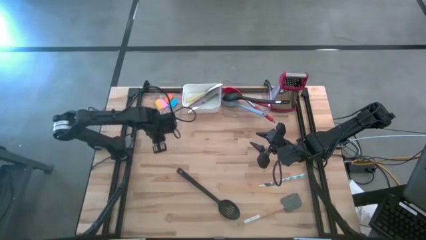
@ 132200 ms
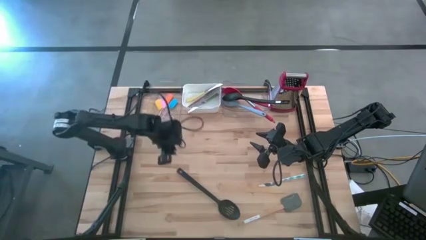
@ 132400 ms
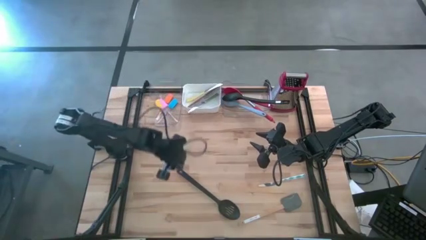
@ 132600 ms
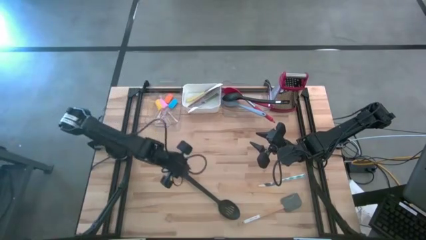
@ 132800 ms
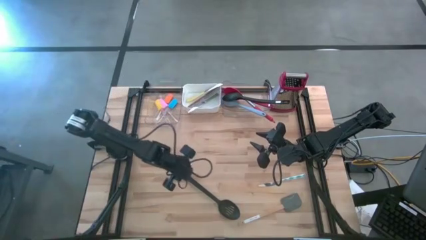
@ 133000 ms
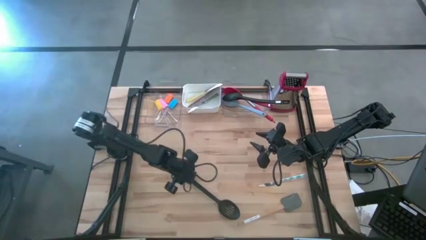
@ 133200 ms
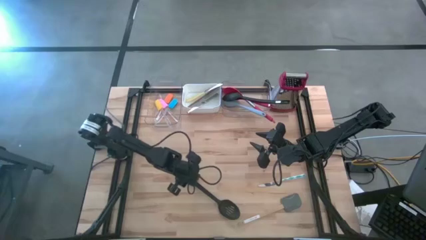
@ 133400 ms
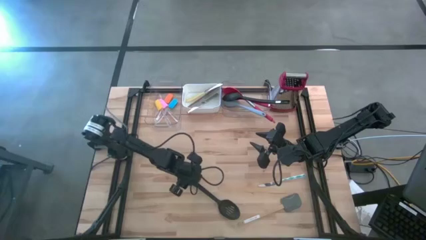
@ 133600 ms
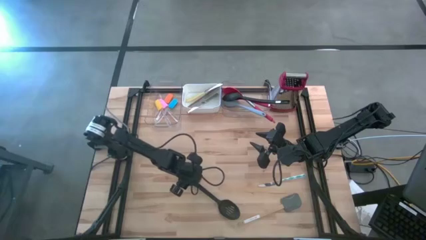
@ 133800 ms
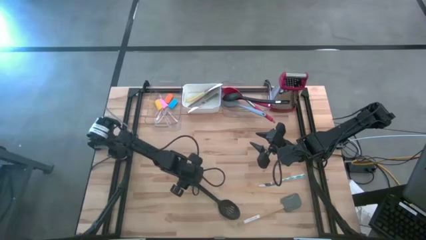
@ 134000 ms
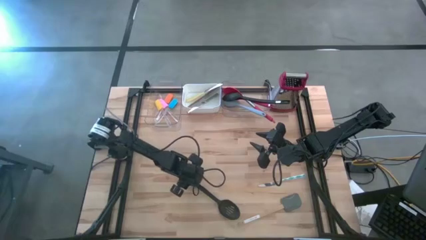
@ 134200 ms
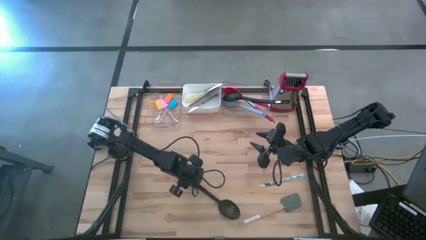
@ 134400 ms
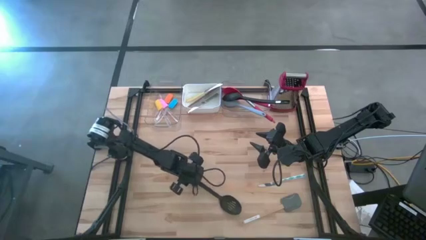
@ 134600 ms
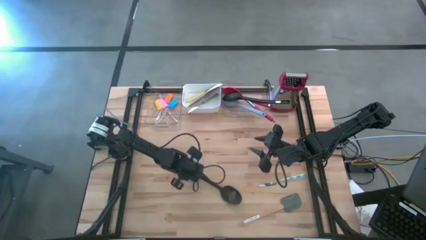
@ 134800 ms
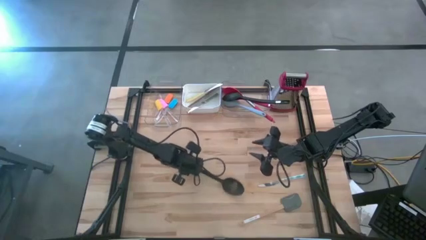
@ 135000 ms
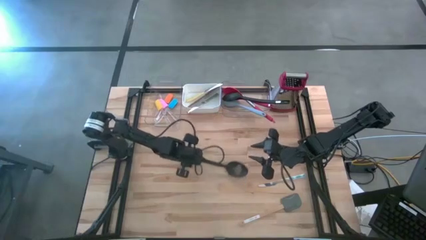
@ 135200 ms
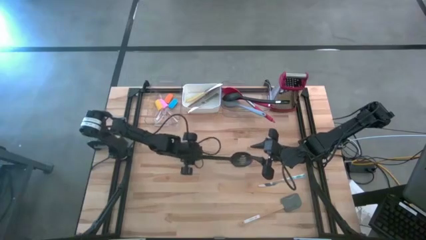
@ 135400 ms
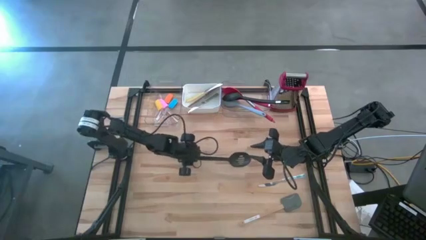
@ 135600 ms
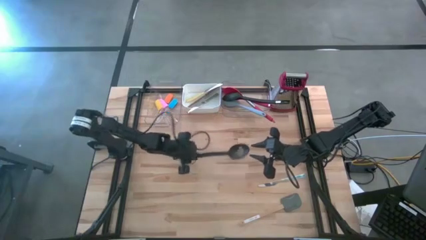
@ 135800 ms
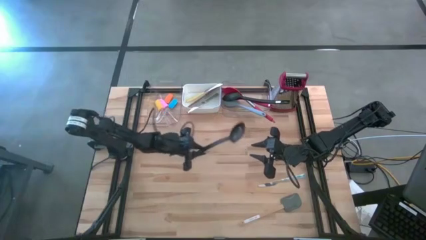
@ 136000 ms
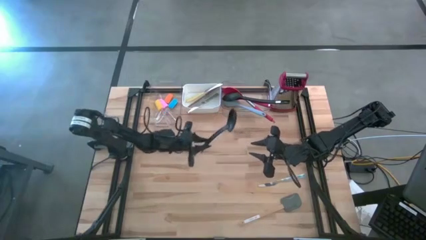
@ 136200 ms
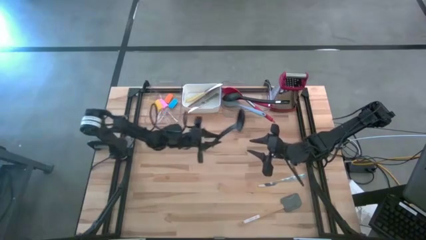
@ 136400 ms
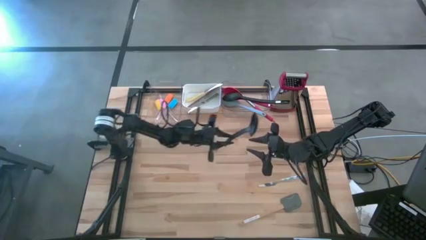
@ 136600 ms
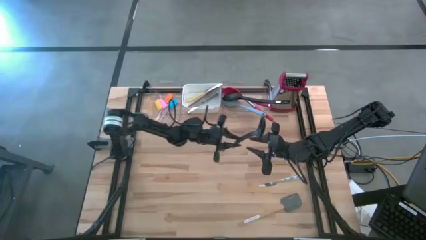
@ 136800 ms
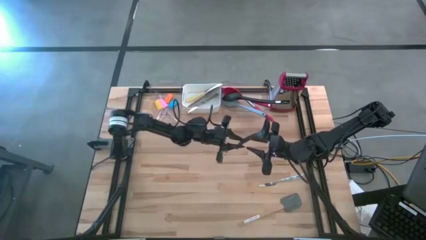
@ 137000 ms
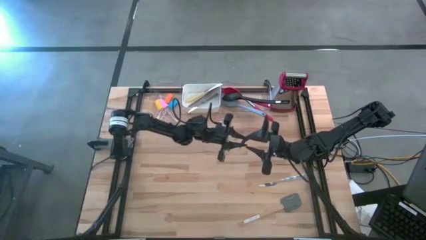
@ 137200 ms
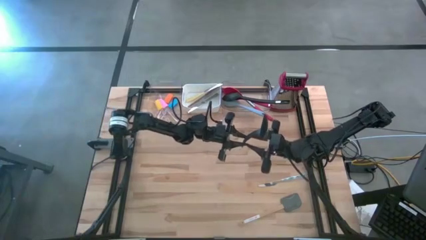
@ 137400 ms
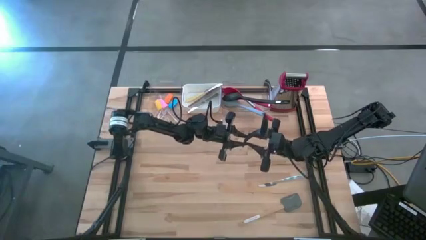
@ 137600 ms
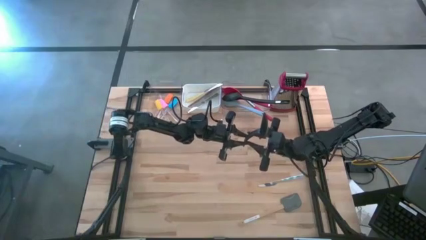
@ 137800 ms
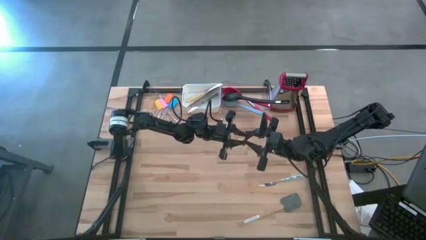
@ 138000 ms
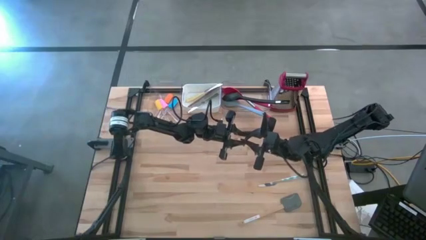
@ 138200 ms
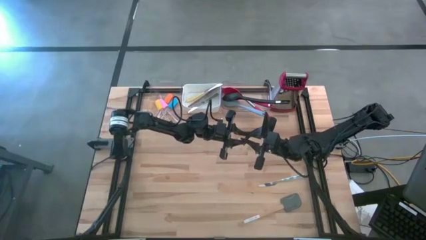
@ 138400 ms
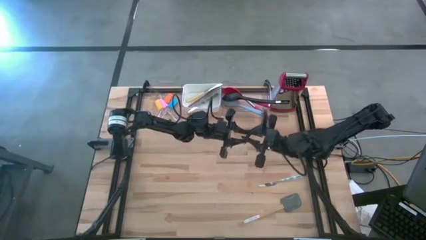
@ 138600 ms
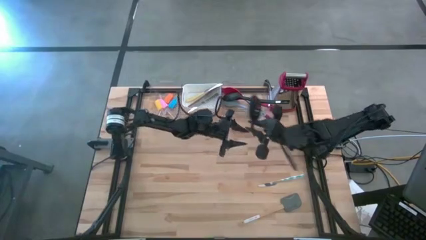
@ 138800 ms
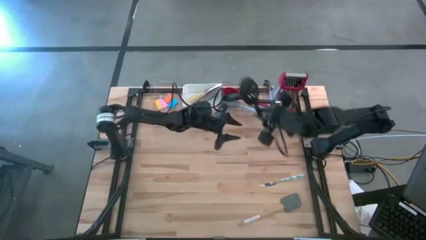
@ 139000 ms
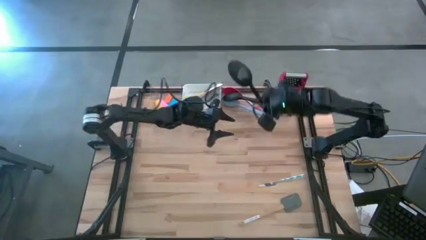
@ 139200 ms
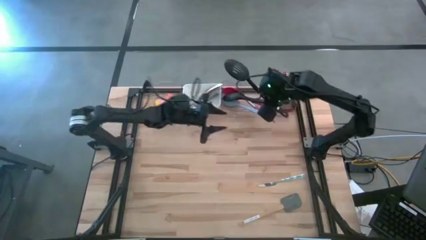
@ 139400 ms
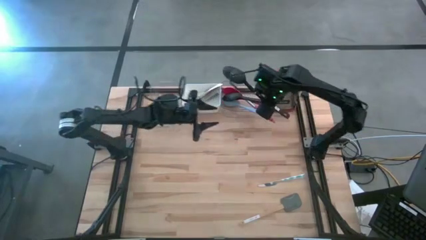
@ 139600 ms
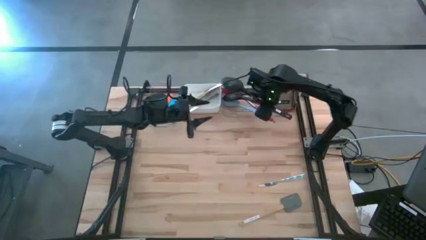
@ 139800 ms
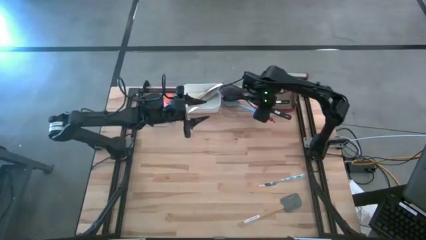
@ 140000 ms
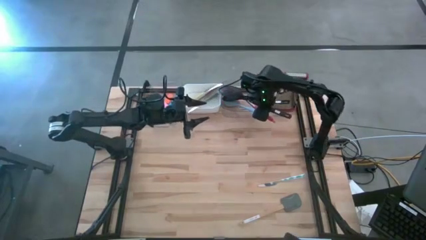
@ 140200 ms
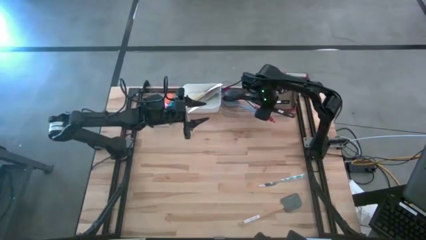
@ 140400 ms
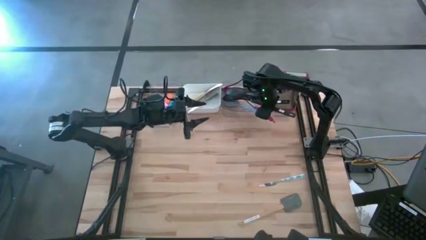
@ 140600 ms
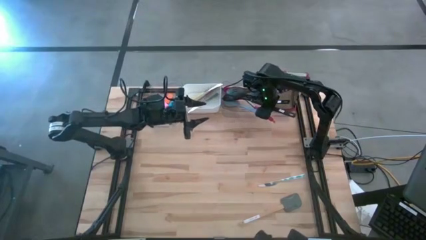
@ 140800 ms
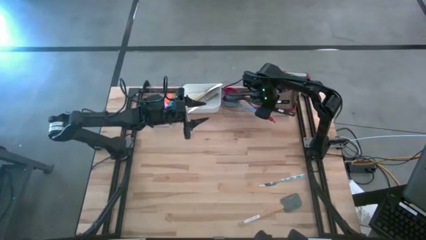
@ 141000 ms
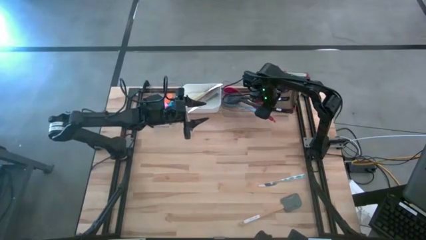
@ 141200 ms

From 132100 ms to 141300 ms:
Task: Pick & Place Kitchen Items
Put the black slotted spoon into the right transparent bin

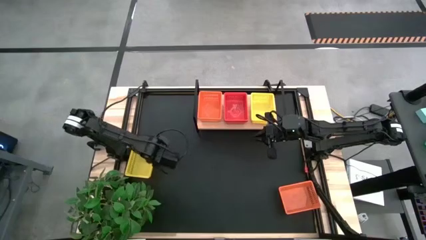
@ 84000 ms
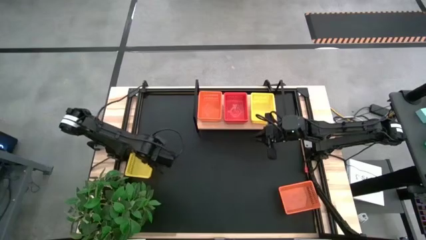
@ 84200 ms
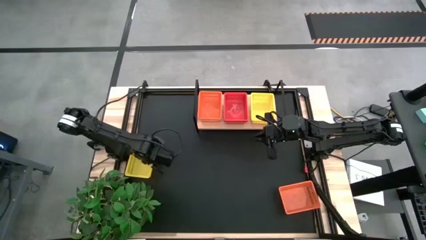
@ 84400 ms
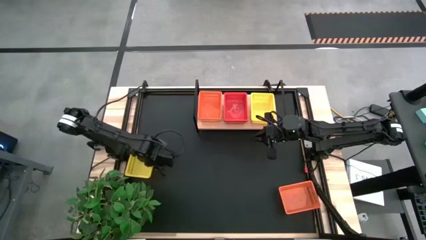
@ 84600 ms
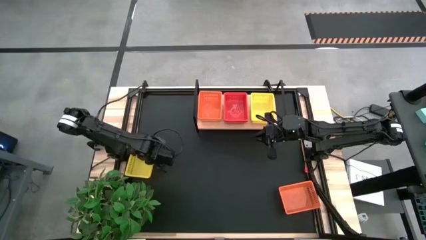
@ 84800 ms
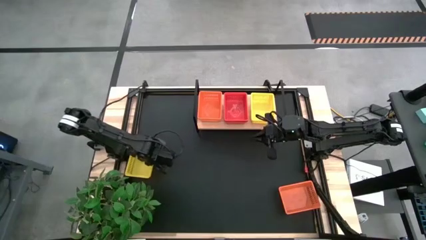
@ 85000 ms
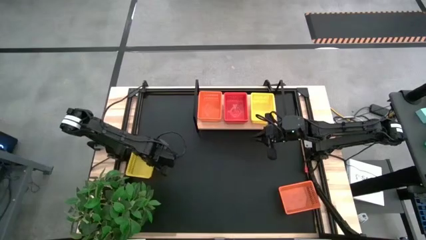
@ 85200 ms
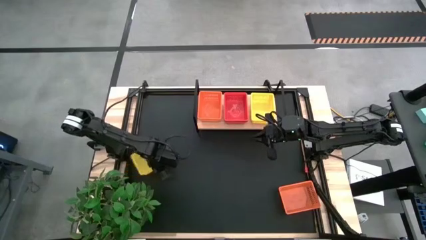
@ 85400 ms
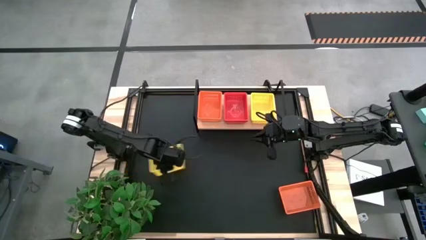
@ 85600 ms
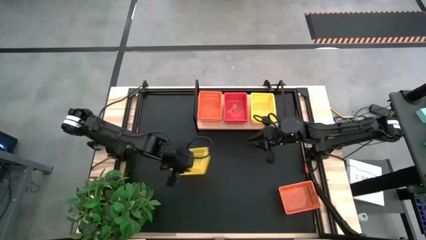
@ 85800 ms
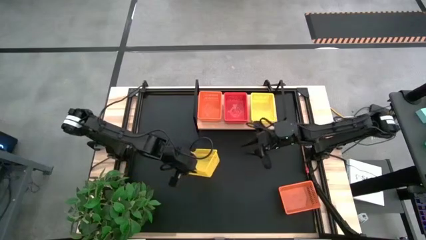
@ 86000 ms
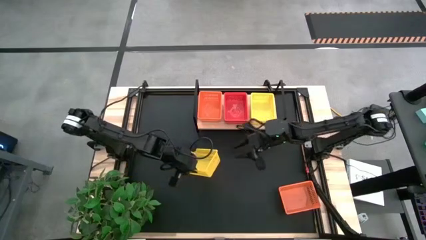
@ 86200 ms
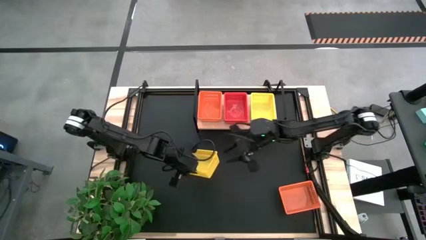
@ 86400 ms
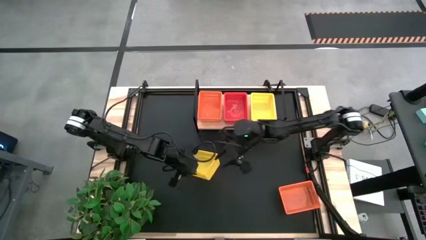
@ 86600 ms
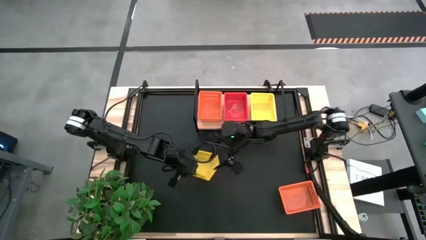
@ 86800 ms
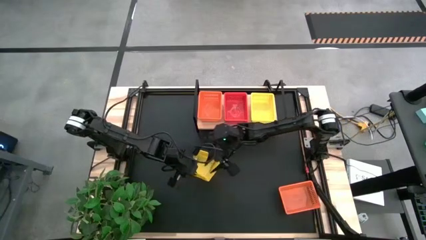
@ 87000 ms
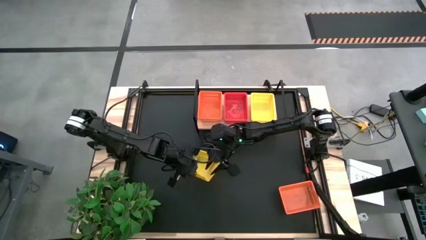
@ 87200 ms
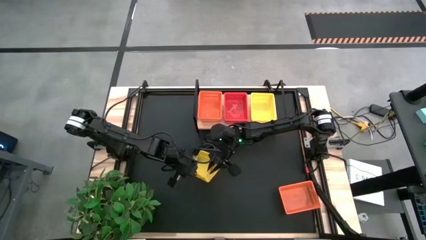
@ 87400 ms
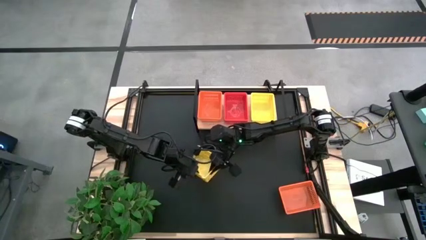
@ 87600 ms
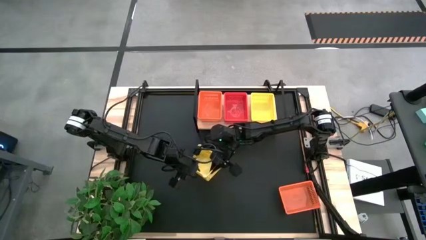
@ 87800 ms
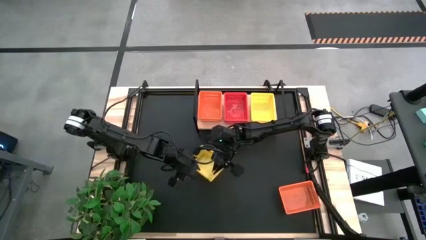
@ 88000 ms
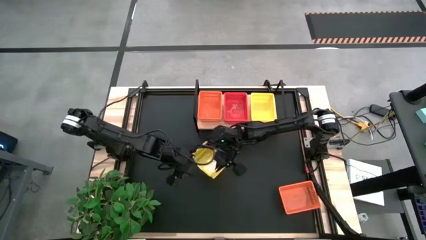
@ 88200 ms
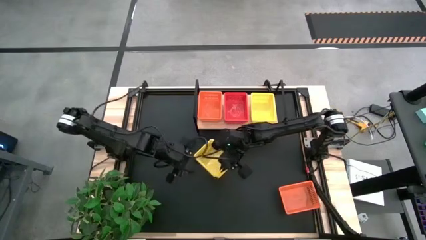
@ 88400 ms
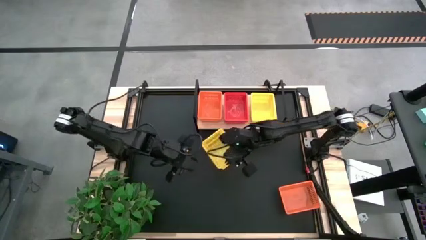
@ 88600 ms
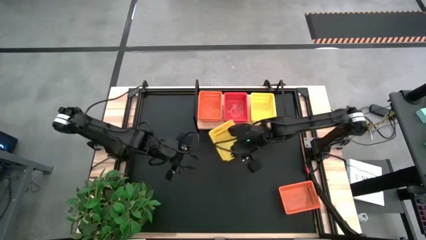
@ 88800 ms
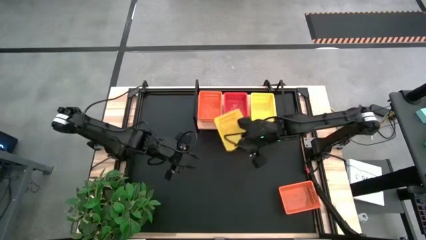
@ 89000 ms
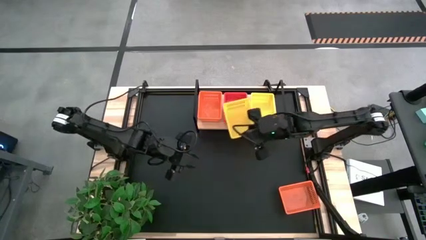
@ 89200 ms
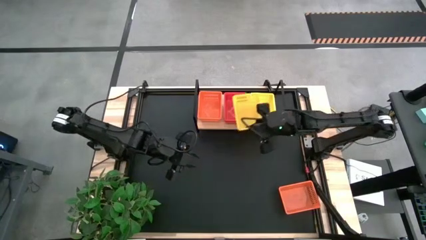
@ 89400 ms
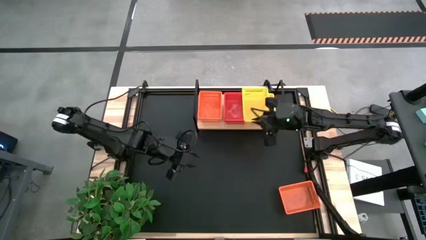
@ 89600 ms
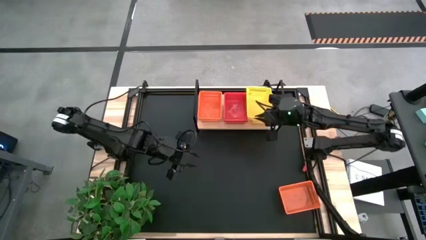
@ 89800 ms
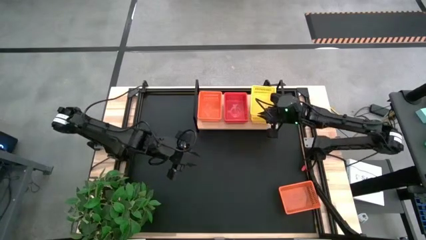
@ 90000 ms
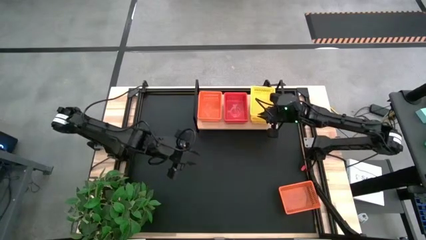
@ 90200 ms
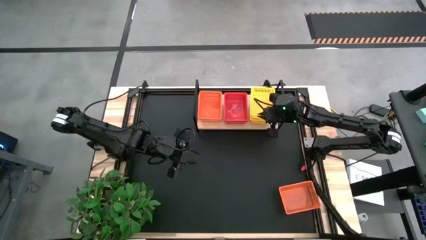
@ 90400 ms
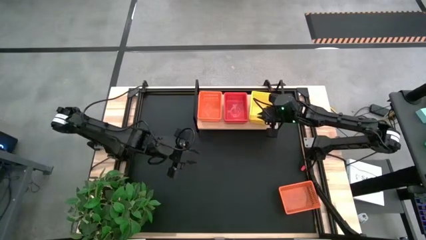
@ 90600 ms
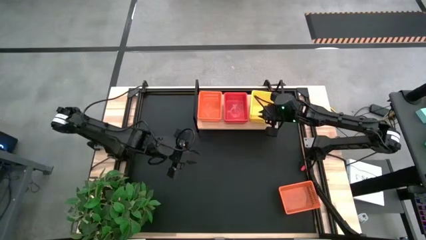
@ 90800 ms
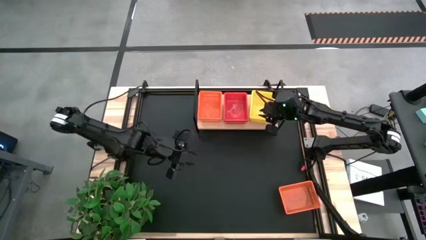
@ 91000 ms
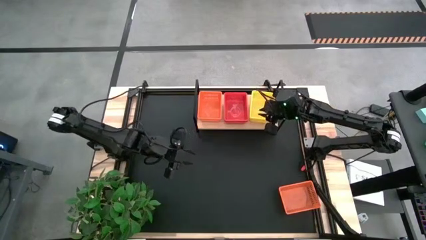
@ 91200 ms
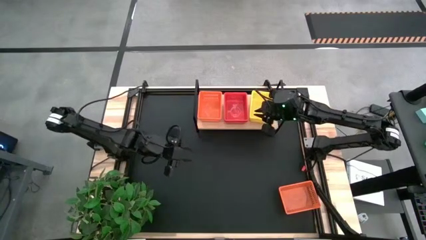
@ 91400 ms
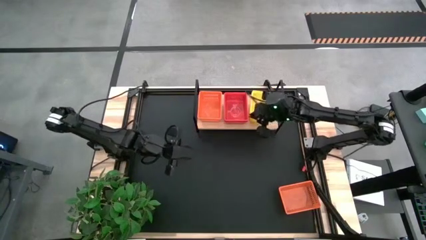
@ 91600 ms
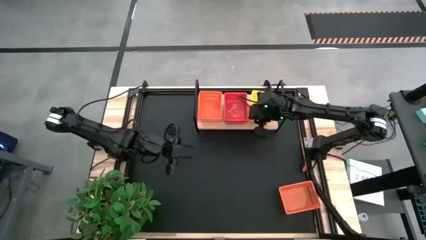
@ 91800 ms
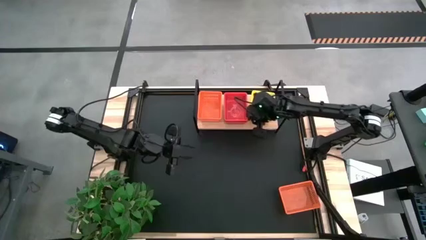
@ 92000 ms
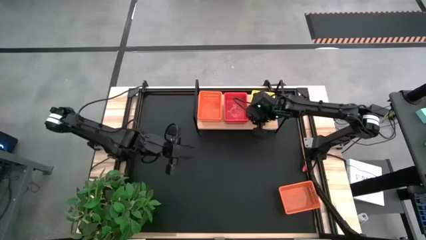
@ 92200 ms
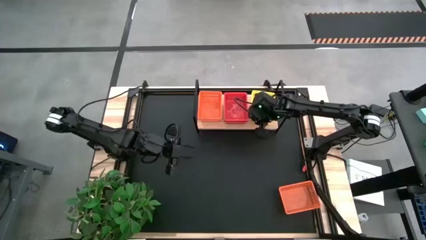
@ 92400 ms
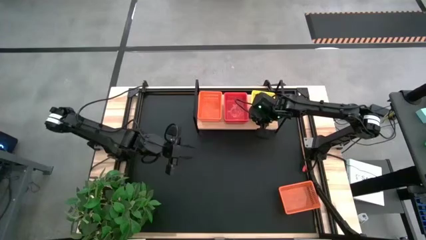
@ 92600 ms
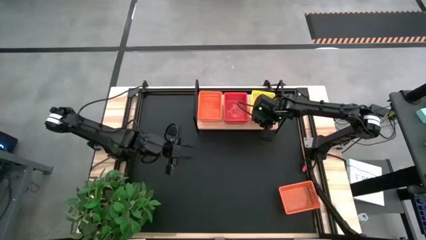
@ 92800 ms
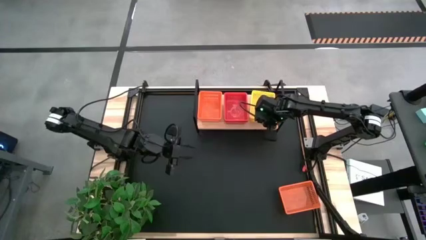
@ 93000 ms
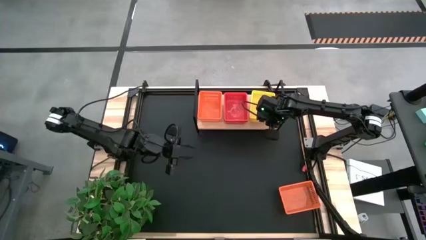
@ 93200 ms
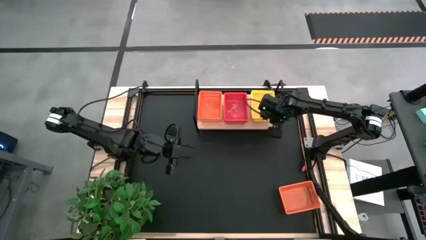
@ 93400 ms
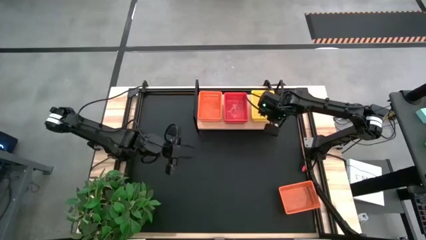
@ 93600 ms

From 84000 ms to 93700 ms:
Task: Stack baskets on shelf by color
Stack the yellow basket on top of the yellow basket on the shelf
